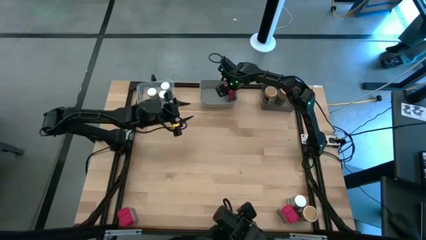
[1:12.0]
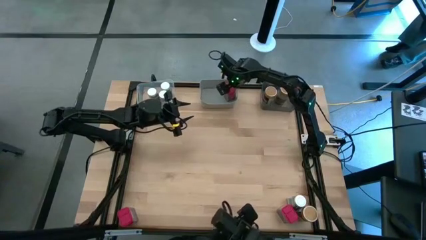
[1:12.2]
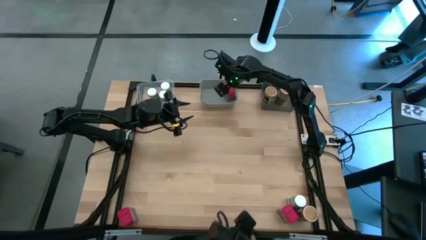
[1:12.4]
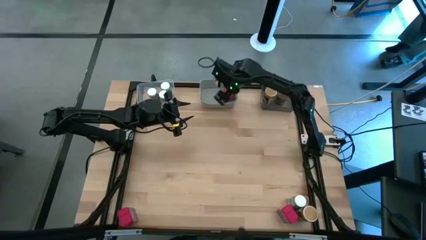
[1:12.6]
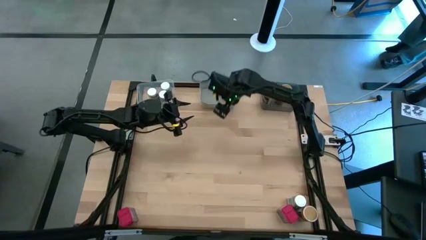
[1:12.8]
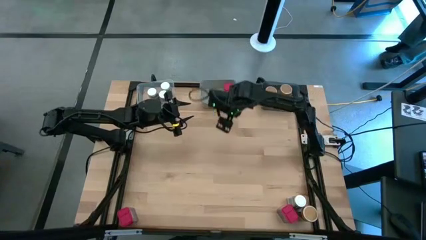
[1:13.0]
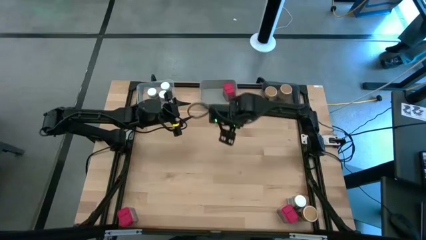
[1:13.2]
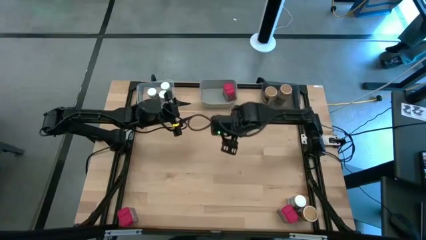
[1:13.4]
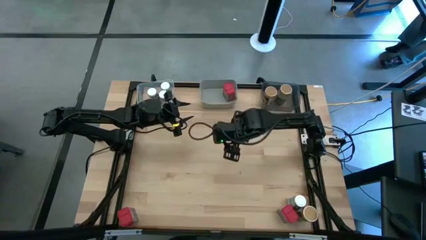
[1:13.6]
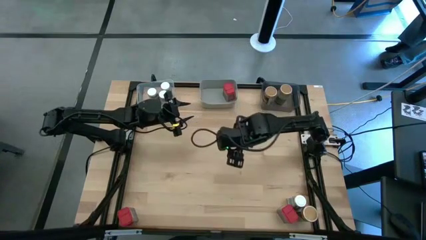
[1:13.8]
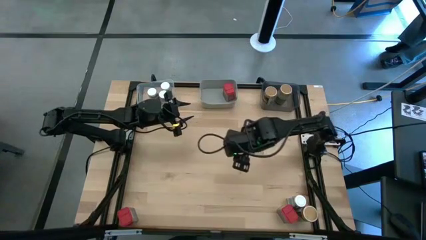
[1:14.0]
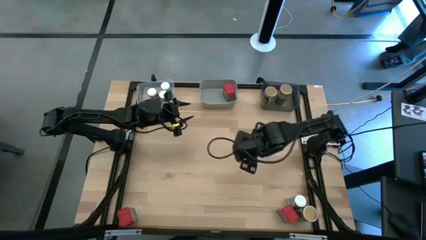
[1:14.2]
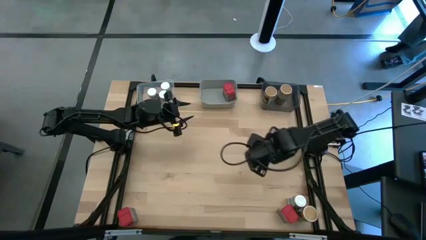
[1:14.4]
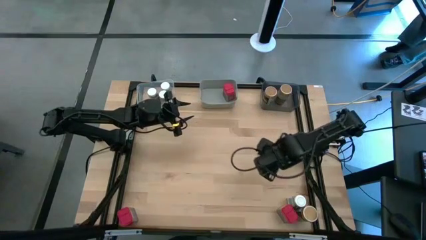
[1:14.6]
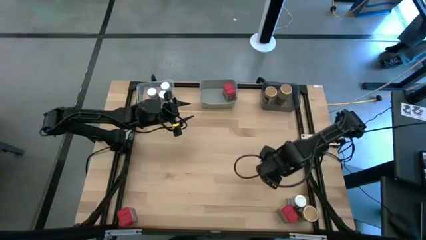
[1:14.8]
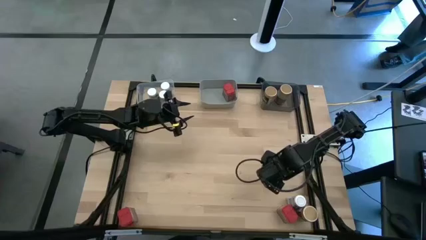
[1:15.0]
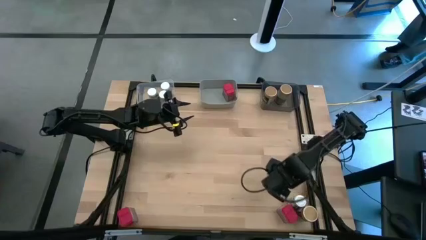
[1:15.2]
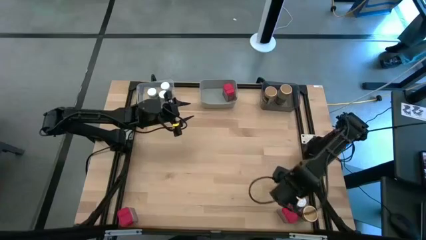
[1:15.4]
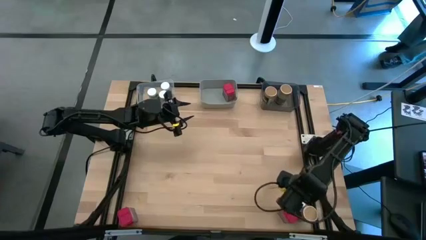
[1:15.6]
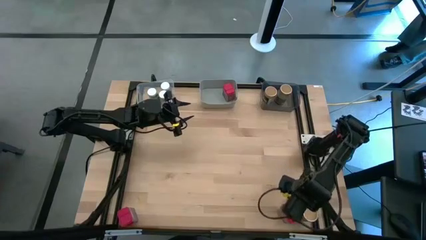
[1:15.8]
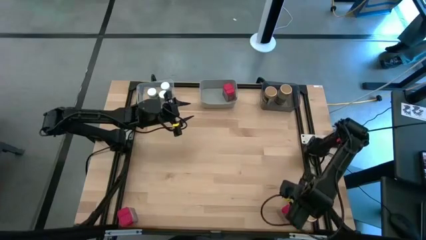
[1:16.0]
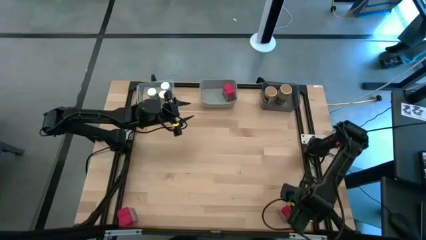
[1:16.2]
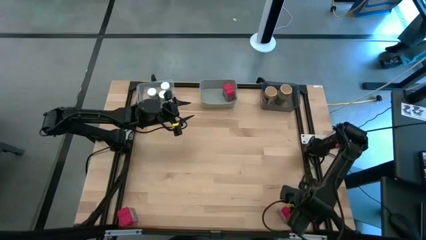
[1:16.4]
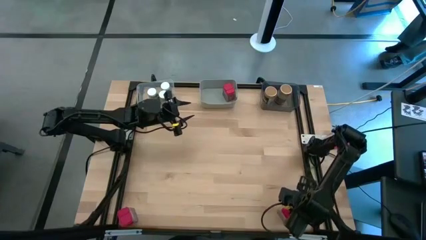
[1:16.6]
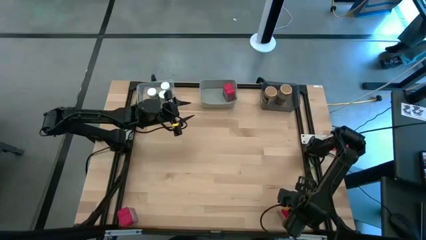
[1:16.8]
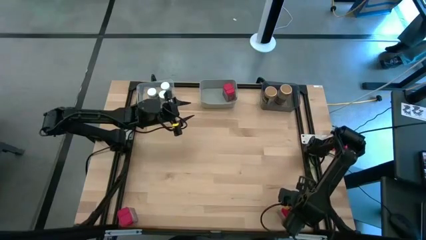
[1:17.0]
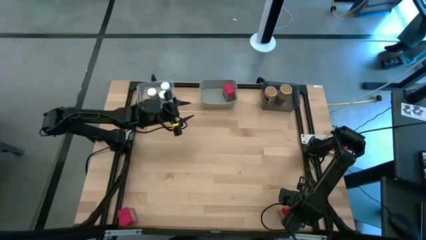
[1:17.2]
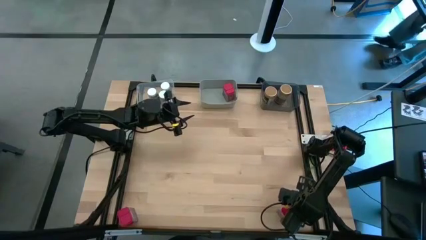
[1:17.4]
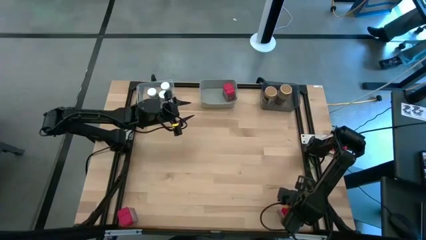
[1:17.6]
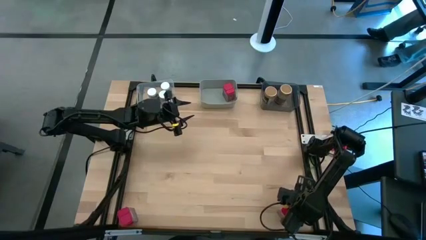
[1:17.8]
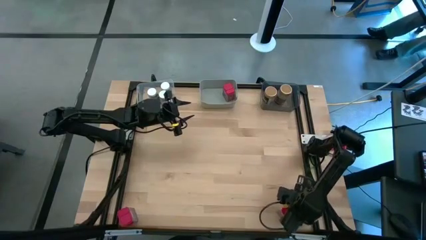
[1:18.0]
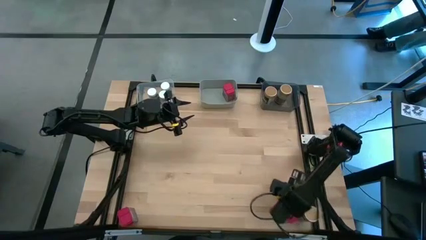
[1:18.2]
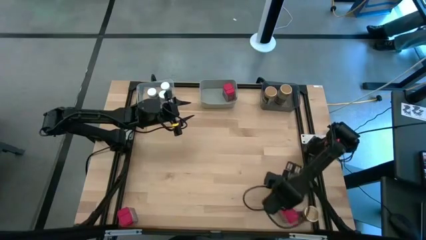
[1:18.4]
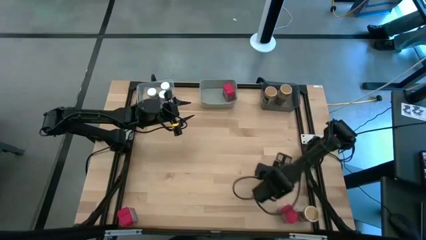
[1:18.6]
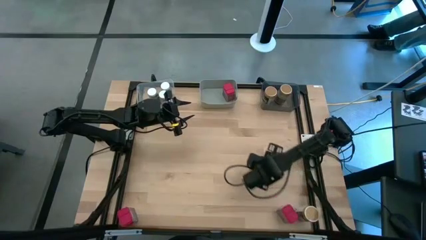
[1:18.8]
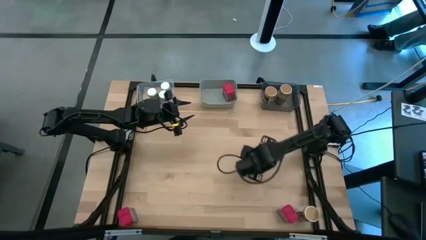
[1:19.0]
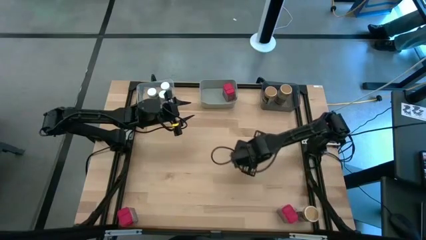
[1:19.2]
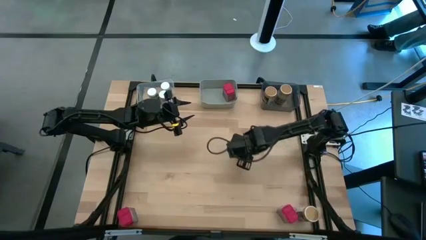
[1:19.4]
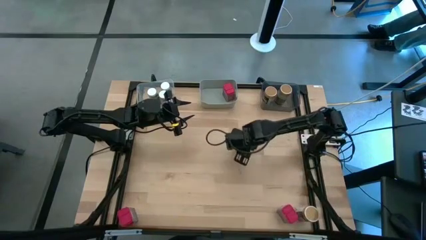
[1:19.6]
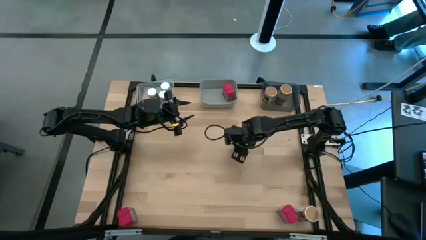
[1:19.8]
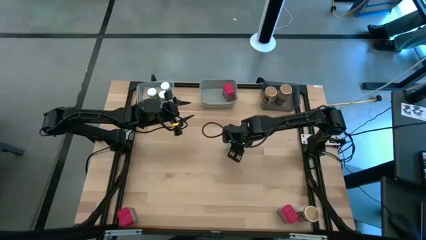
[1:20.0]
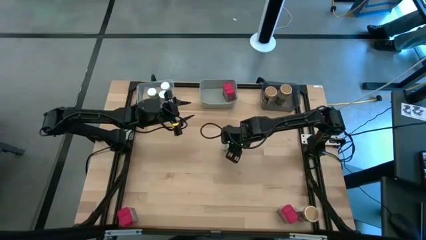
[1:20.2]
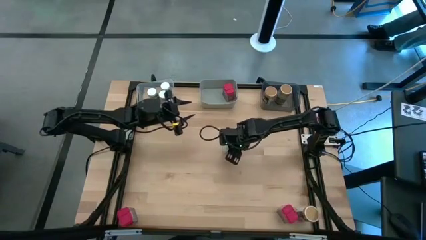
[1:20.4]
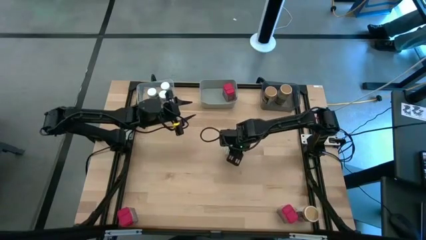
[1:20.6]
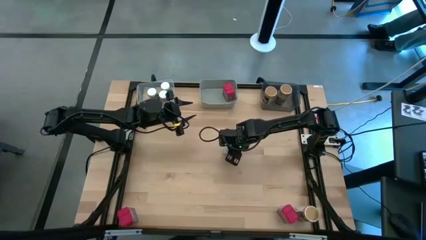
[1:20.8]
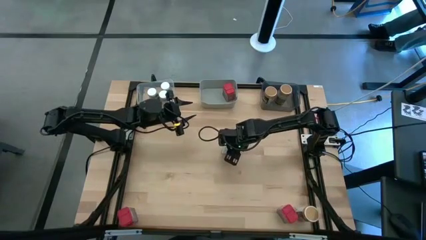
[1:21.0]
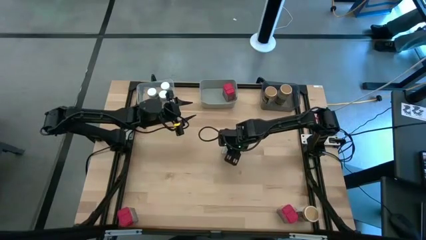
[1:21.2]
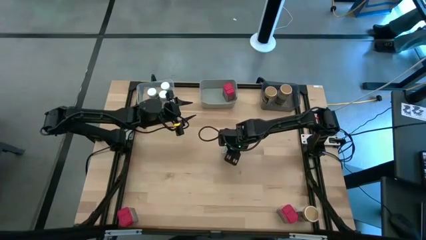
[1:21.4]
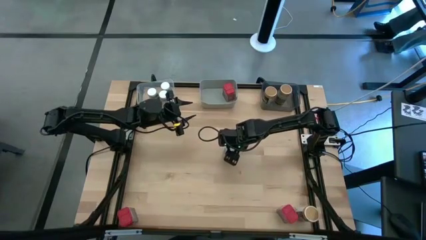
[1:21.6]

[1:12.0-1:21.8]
Task: Sort spices by type
Put the white seasoning bottle into the transparent bin

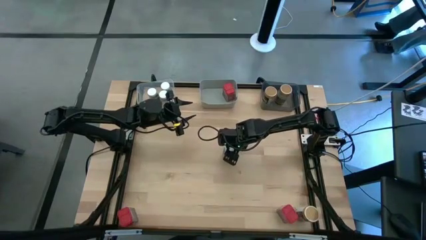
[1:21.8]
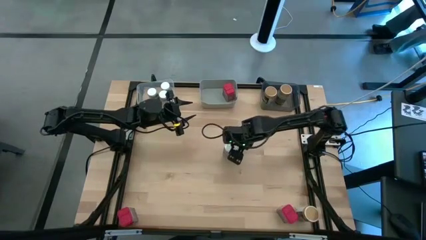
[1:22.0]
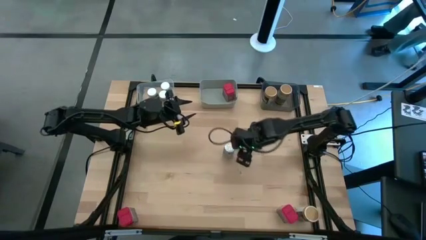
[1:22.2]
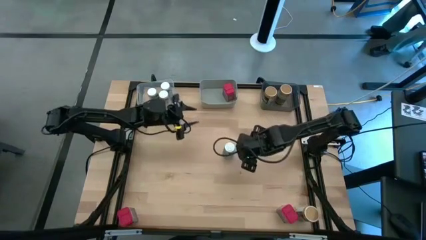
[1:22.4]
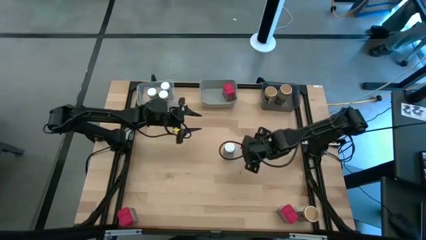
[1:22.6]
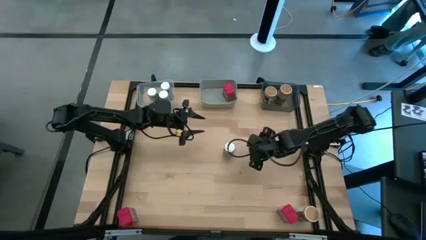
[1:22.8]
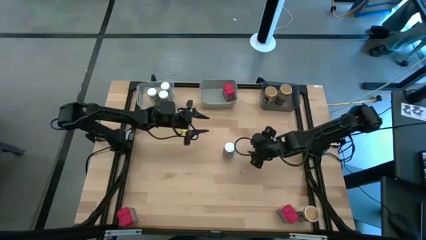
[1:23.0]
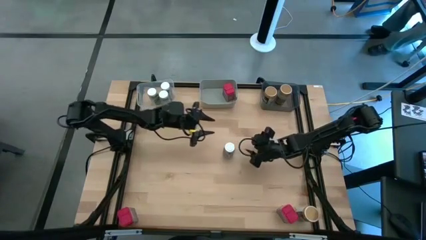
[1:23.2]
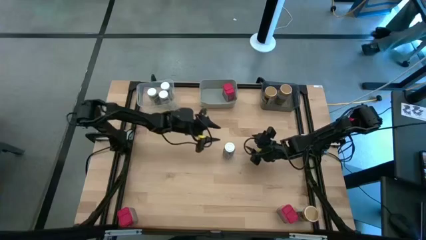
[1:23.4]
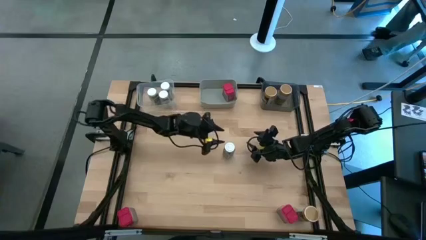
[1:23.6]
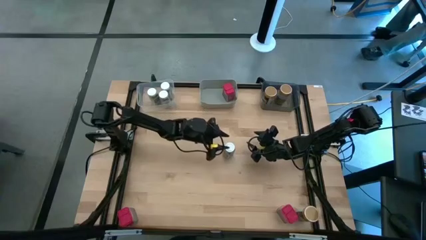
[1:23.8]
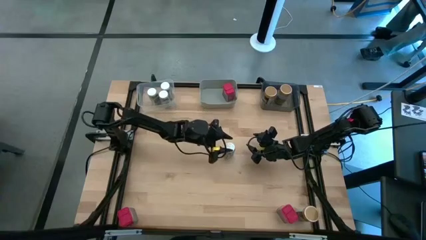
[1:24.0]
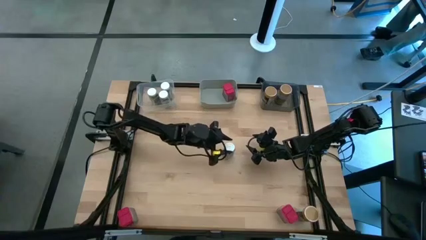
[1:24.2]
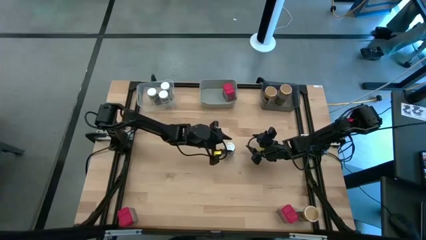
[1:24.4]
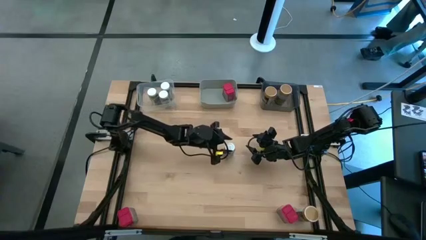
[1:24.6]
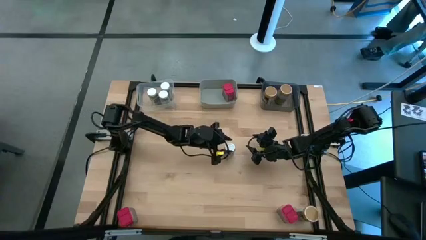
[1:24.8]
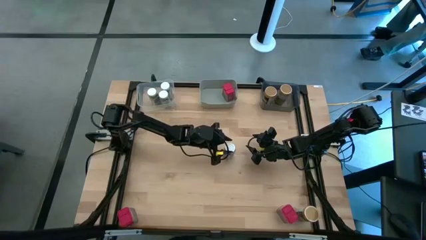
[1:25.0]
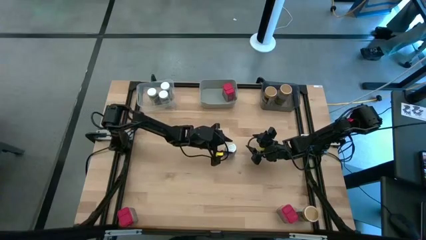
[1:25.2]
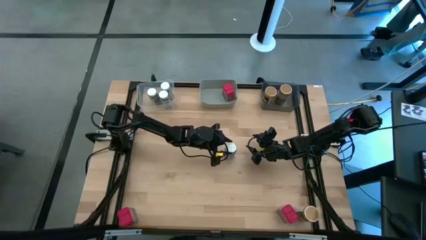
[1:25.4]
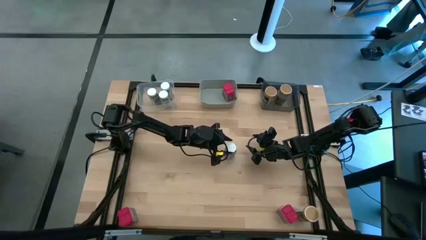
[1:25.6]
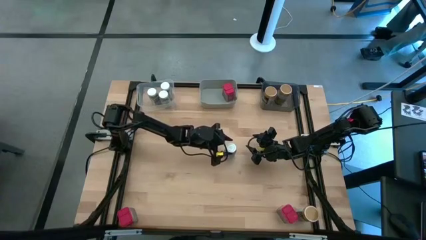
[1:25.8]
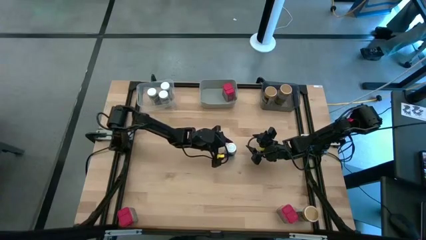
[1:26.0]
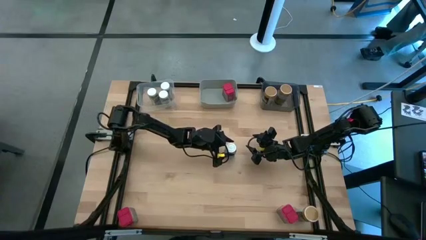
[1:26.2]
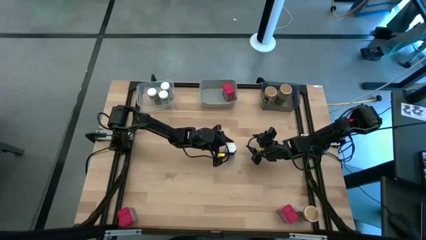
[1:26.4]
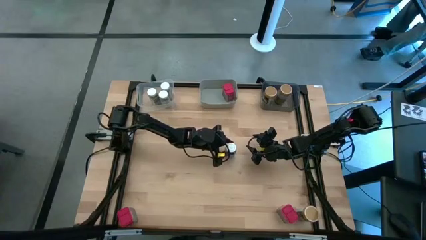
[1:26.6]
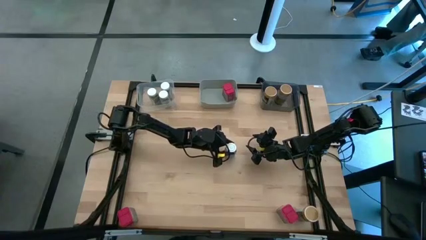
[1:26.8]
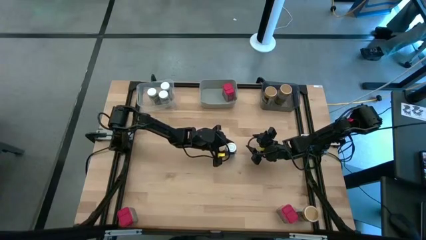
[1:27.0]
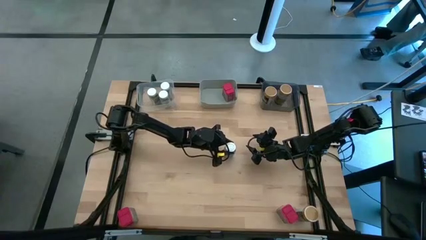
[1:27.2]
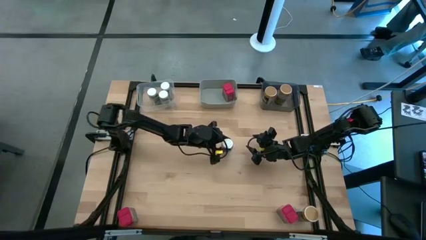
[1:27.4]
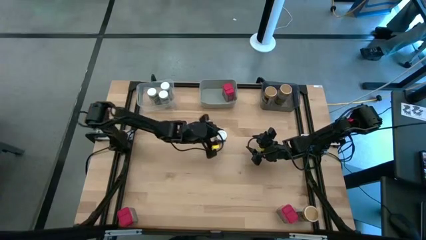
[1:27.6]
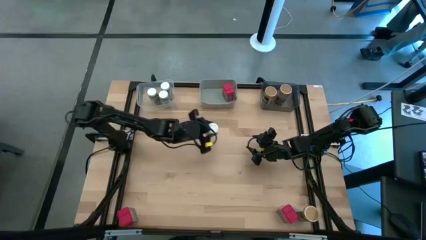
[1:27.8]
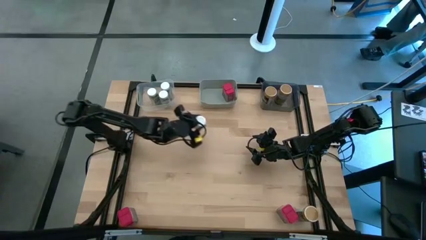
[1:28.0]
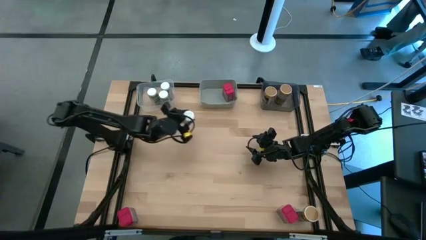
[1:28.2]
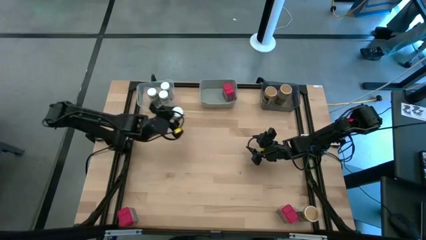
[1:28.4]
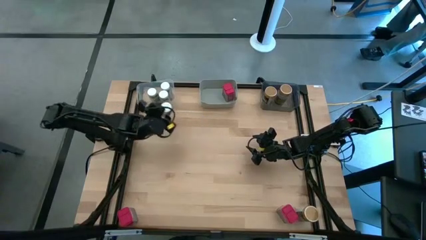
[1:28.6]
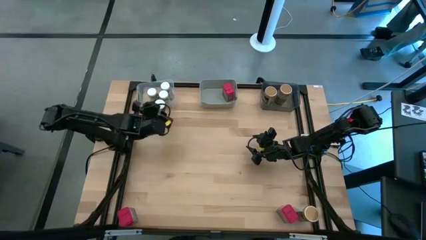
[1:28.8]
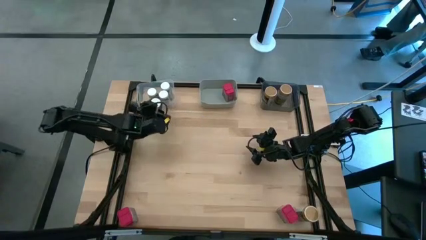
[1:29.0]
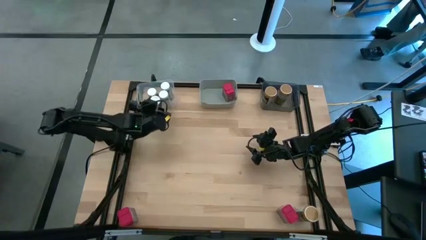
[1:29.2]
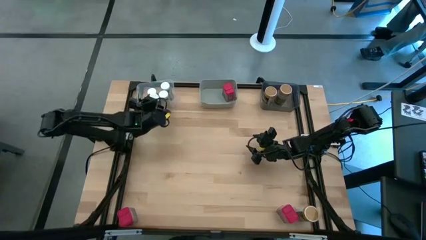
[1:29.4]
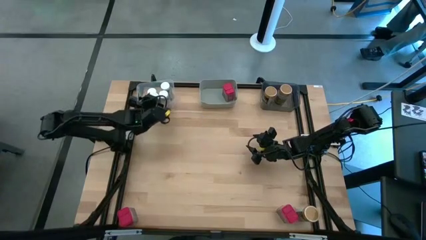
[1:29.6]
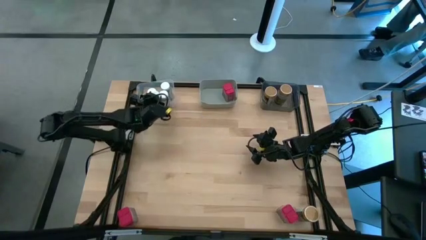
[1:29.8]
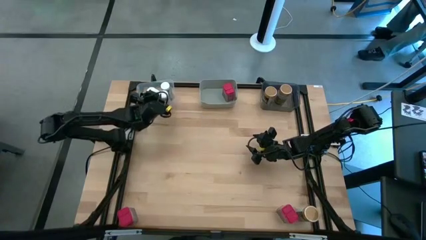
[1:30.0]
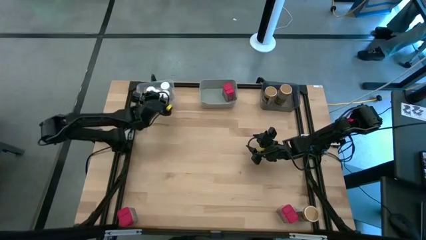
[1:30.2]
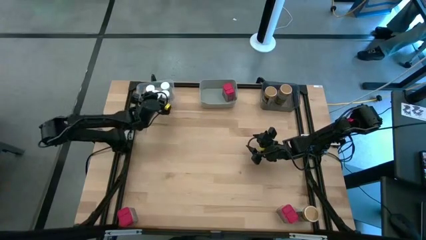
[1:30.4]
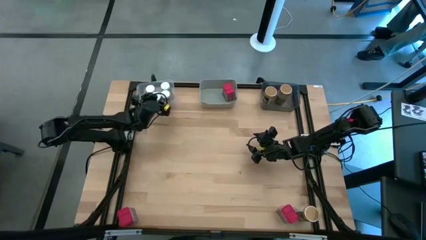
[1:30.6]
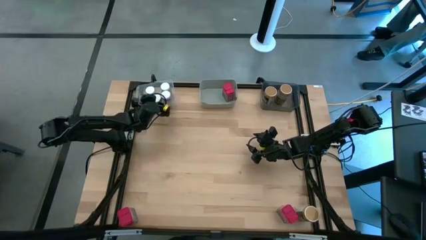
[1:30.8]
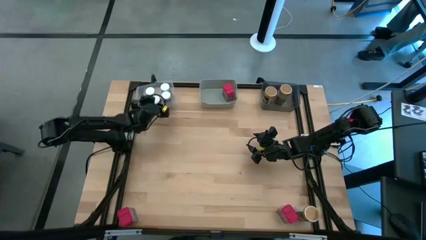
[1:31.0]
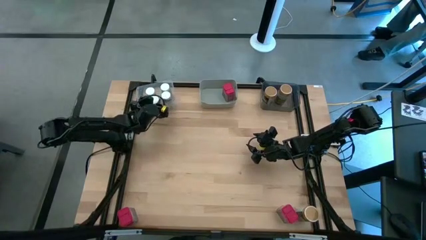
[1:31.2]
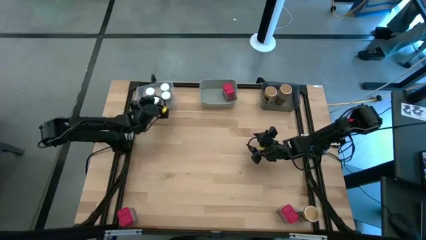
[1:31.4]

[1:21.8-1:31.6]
Put the white seasoning bottle into the transparent bin
